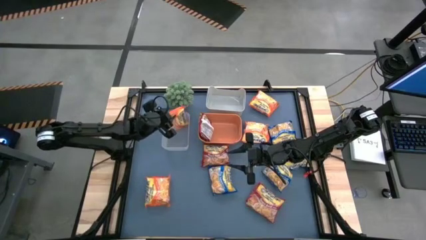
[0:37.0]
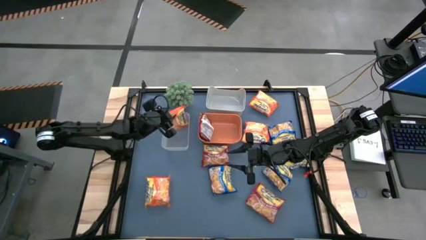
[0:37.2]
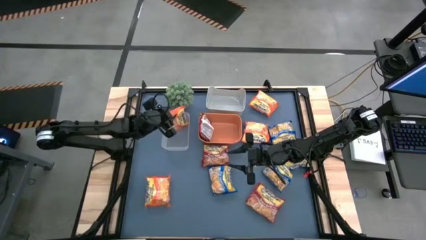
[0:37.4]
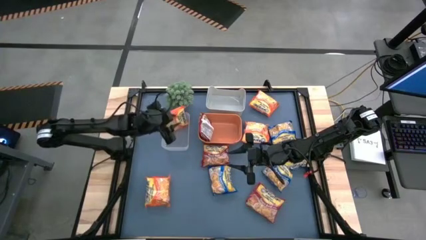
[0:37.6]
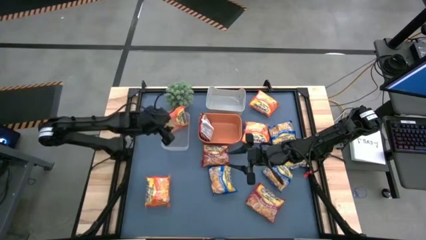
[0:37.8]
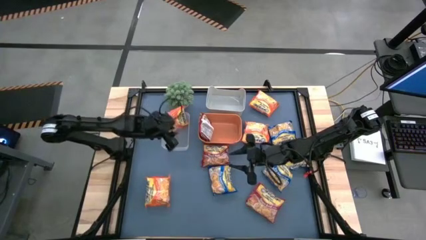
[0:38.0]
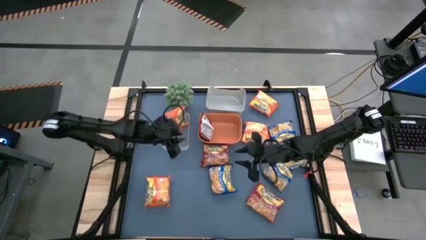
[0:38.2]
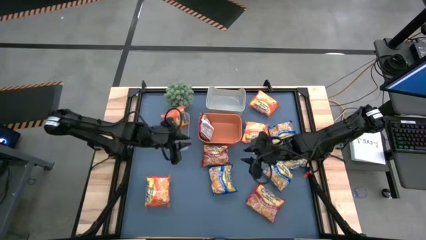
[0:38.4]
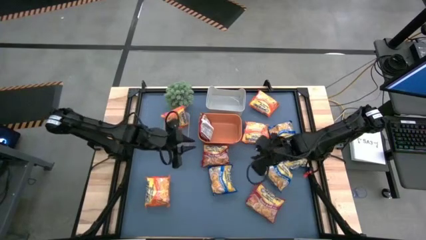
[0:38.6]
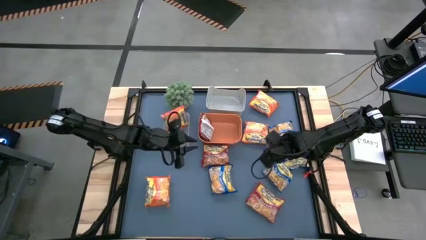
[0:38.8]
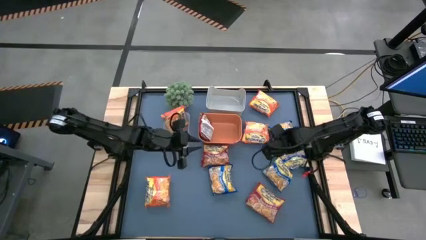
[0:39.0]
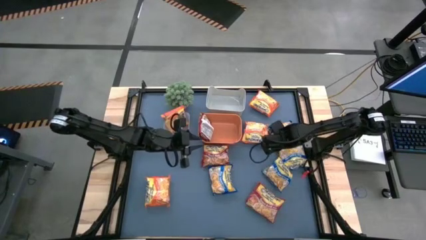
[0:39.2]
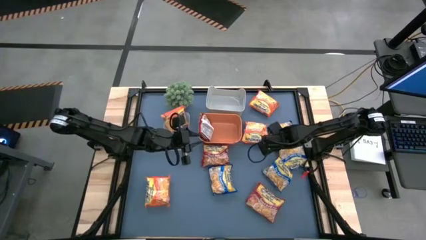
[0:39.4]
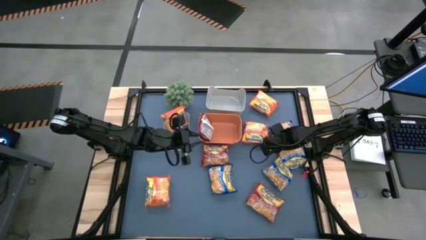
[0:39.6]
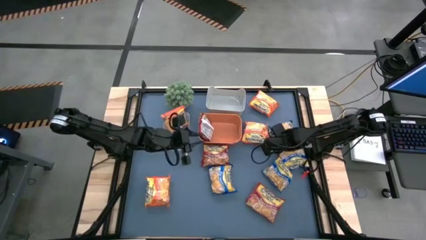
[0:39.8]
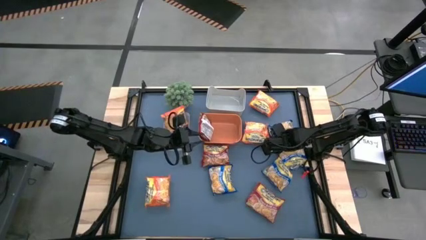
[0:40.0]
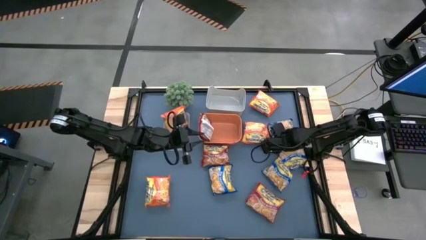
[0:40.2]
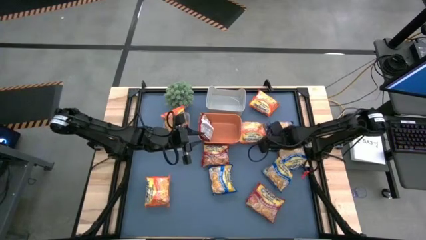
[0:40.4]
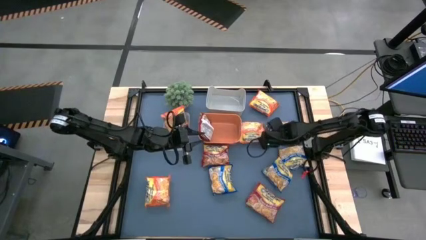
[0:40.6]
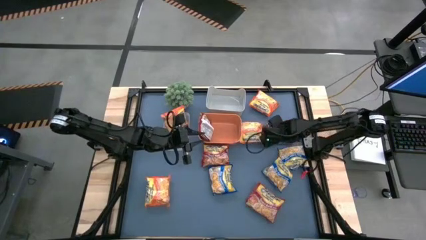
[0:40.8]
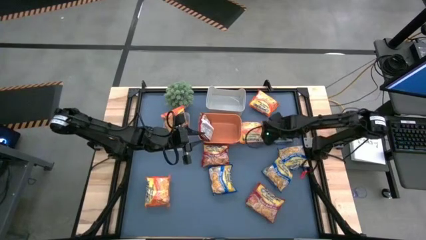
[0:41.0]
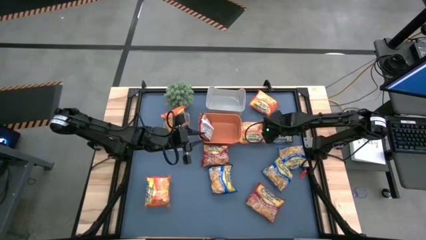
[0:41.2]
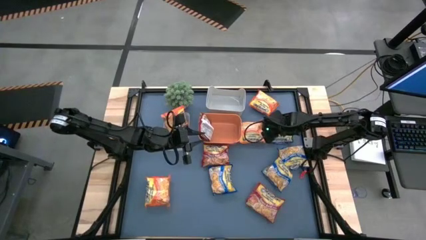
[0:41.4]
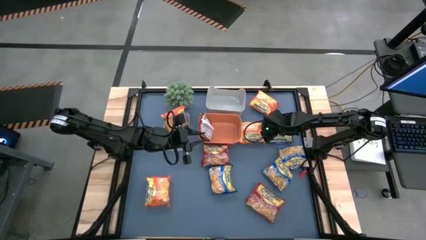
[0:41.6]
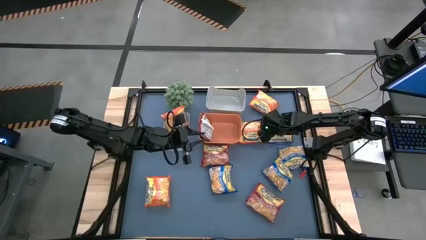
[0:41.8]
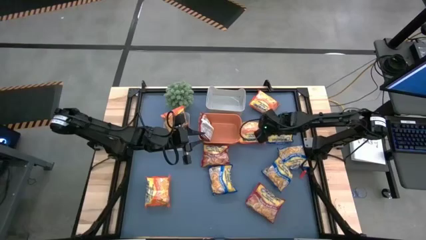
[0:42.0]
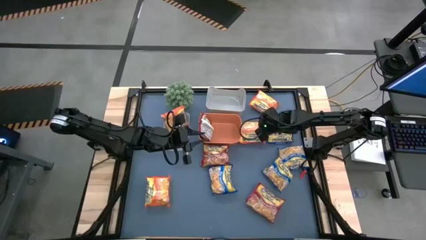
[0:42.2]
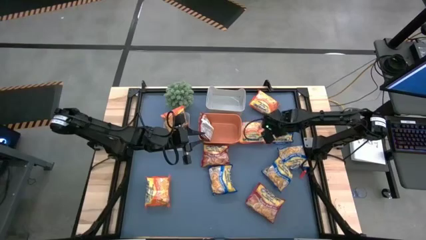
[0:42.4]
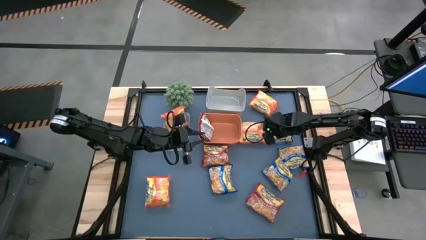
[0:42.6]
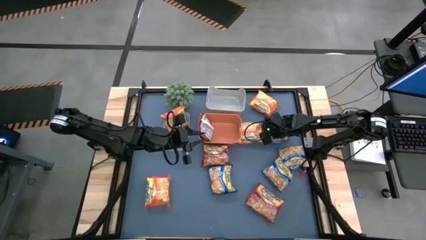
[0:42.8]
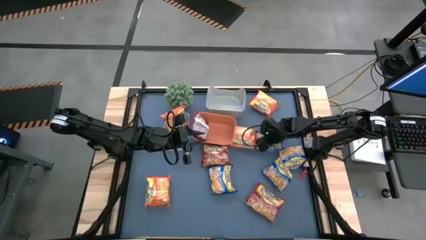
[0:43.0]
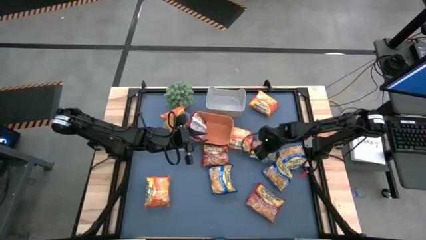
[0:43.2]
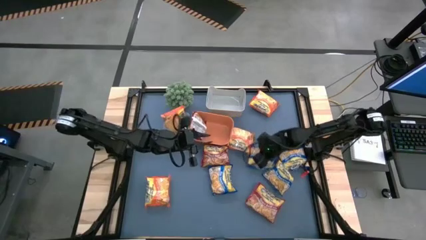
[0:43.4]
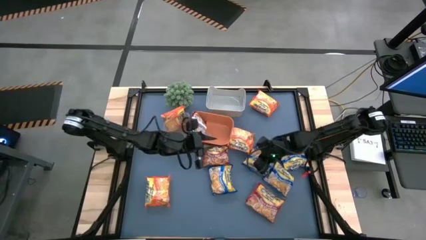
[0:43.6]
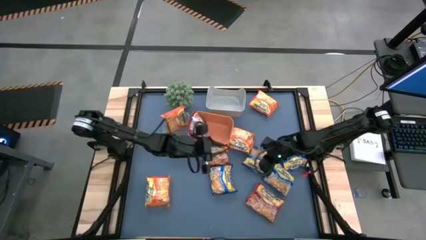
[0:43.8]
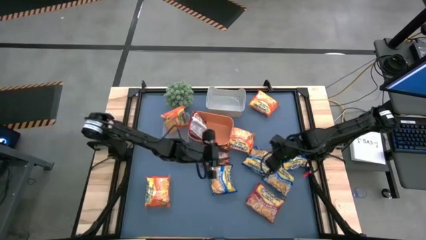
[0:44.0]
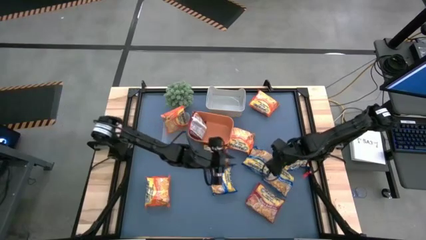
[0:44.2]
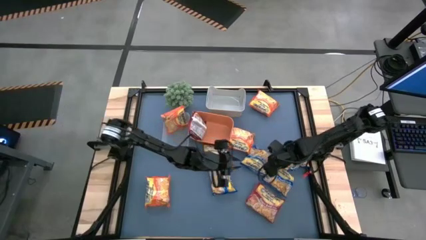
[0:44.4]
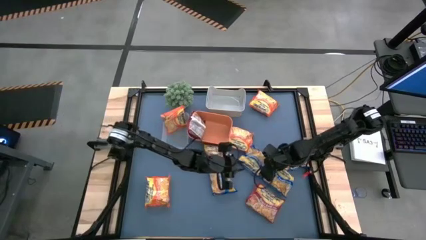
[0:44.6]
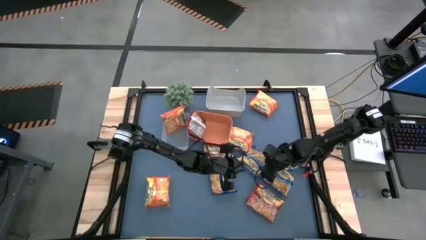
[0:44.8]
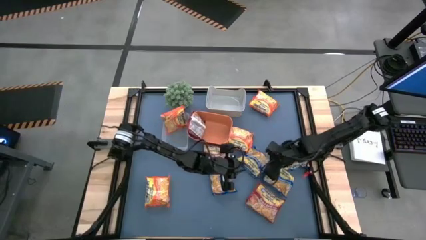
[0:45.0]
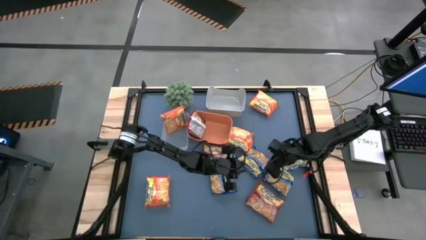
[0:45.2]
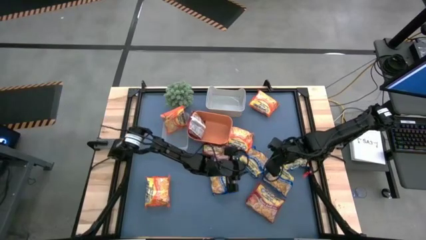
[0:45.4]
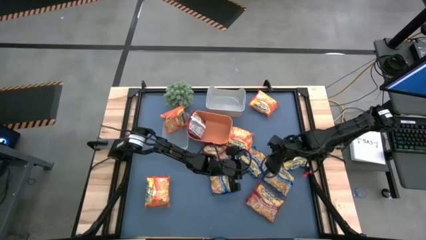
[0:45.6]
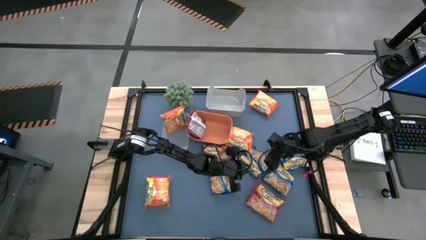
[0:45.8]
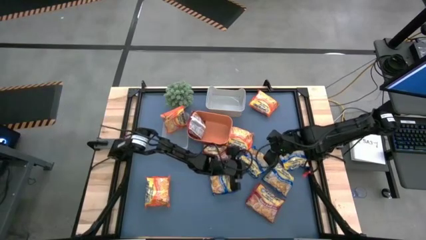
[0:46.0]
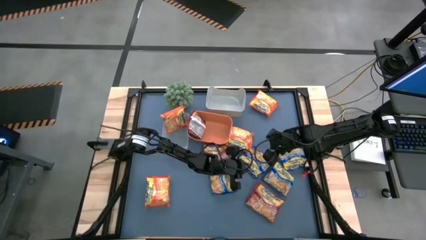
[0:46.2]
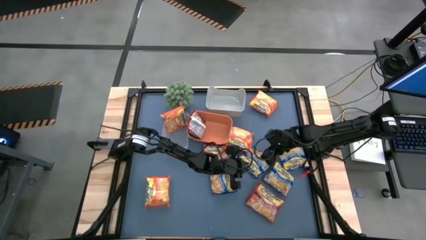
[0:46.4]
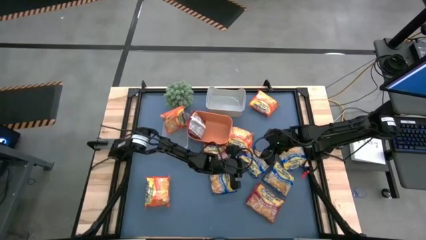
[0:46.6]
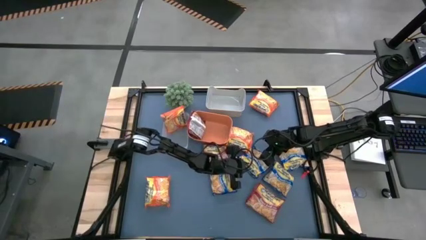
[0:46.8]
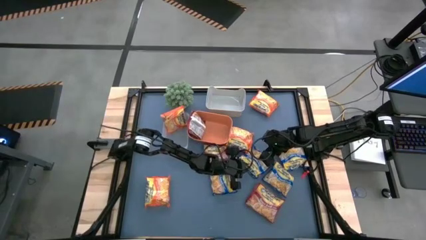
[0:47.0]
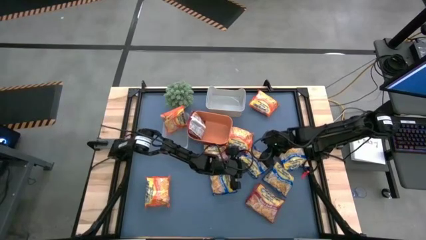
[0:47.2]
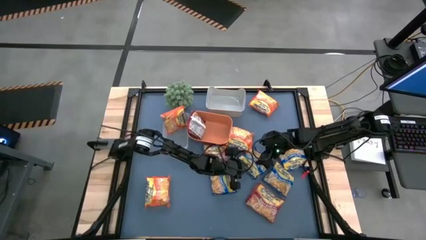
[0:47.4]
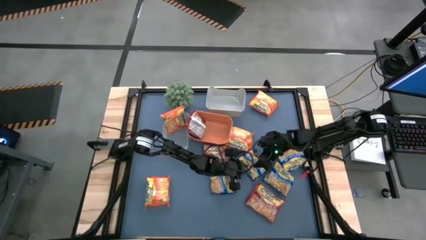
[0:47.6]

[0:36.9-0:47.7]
Task: Sort Maruchan noodles
Put the blue noodle pack into the gray bin

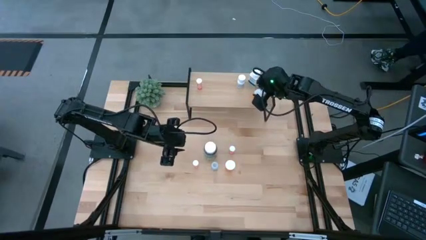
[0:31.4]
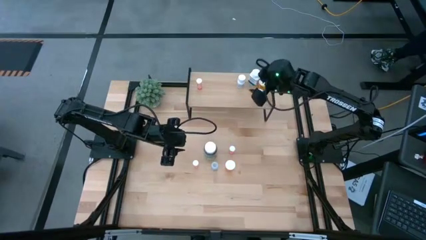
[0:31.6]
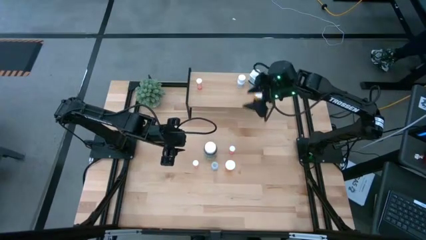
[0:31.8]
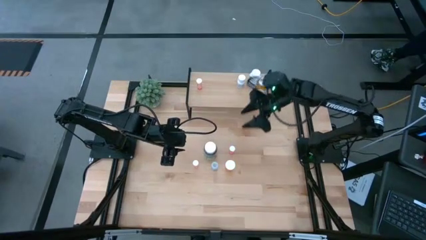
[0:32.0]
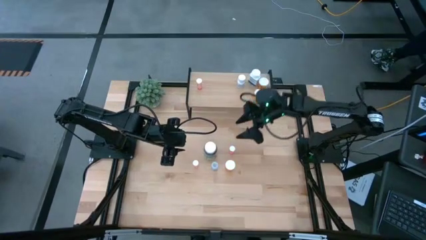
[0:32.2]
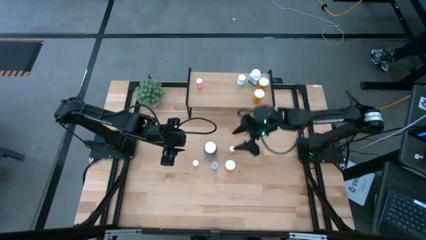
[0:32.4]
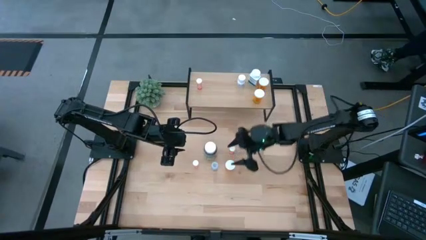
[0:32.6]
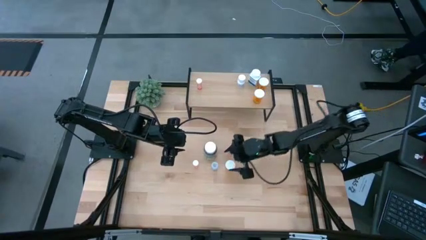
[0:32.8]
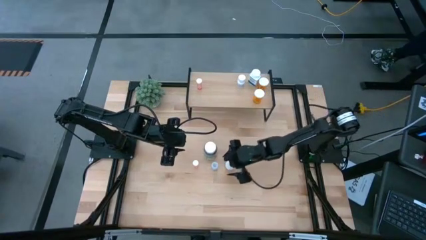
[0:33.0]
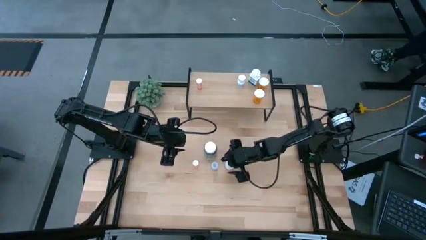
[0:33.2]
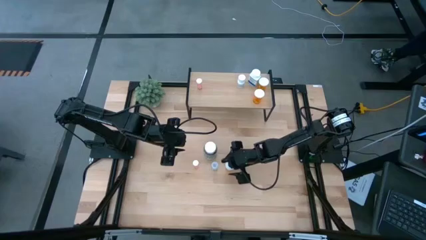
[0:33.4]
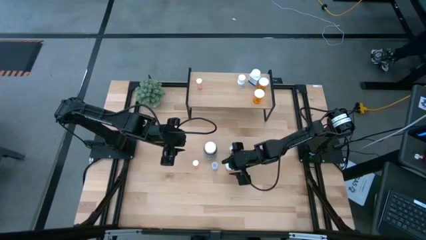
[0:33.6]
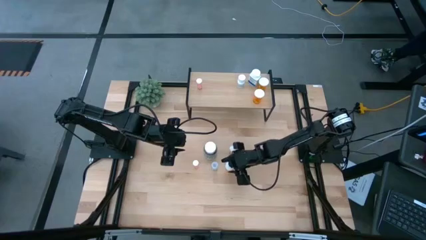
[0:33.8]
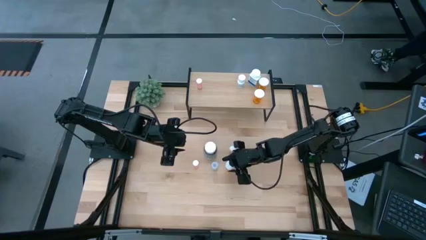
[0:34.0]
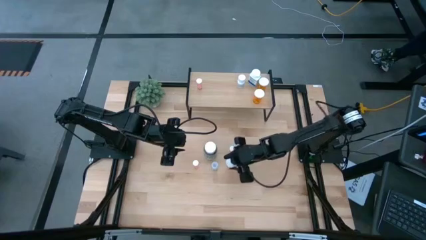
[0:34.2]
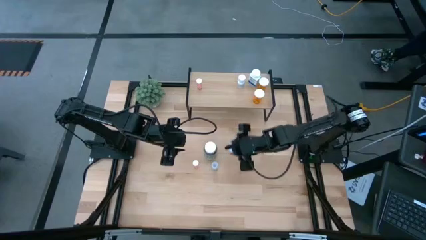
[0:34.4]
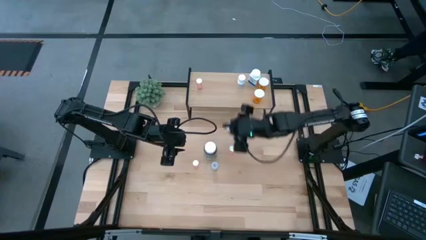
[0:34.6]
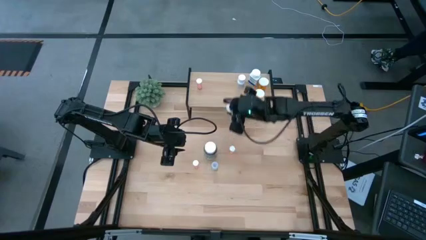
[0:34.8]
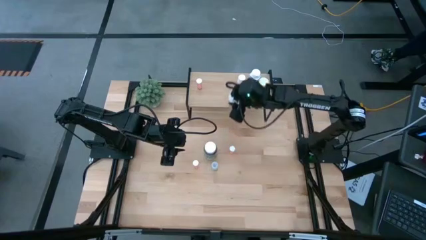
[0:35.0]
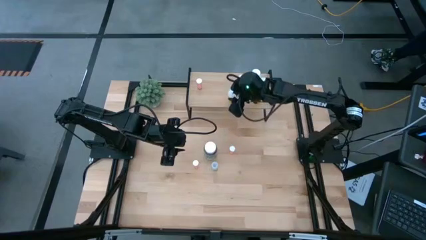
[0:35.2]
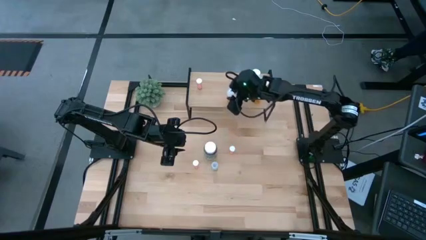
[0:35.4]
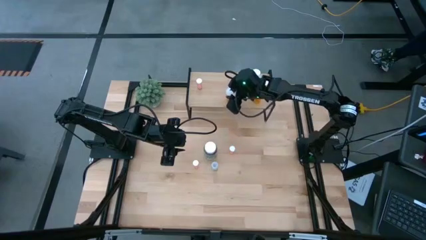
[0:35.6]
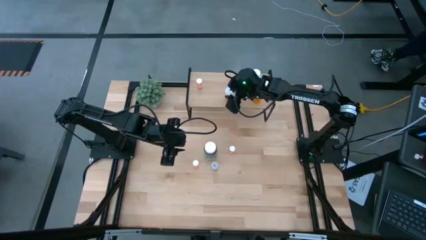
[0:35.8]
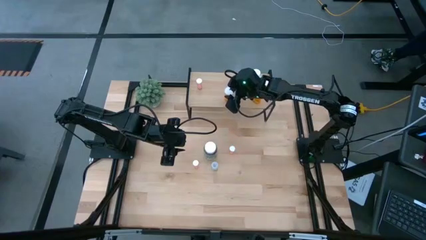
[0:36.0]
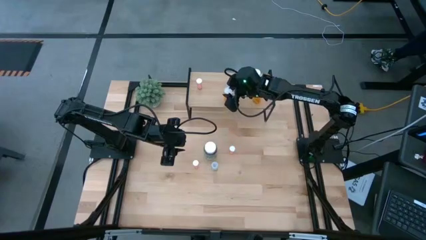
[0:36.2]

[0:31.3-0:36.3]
Task: Pick and place medicine bottles onto shelf by color
Put the orange pill bottle on the shelf

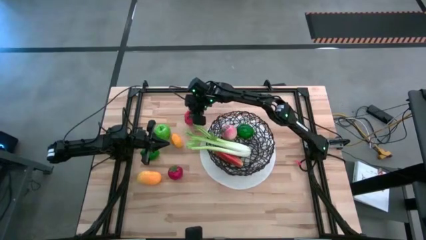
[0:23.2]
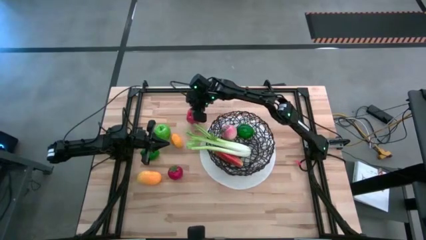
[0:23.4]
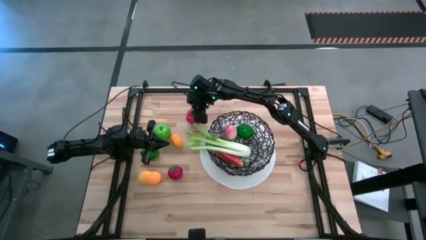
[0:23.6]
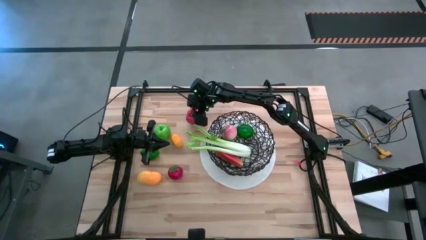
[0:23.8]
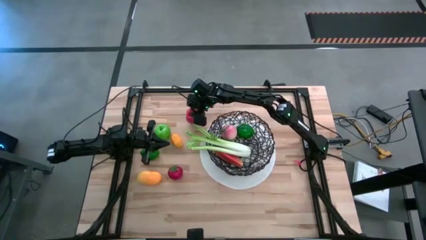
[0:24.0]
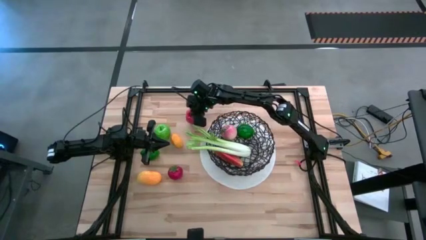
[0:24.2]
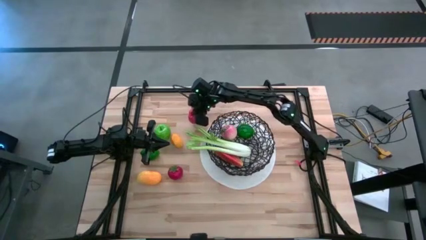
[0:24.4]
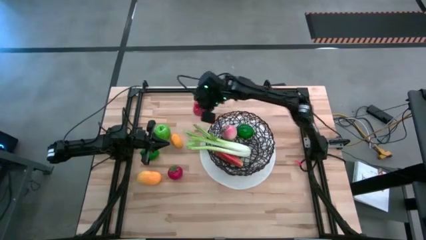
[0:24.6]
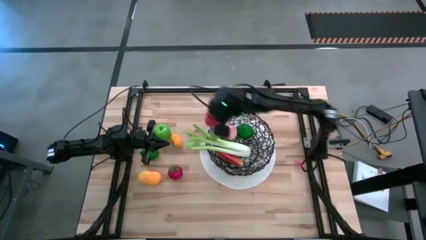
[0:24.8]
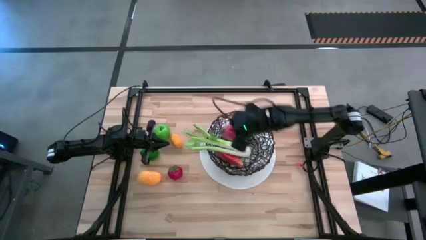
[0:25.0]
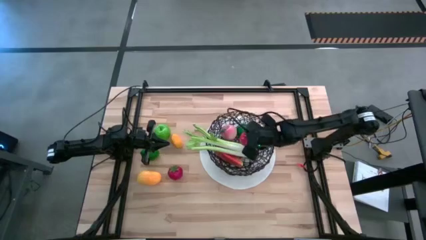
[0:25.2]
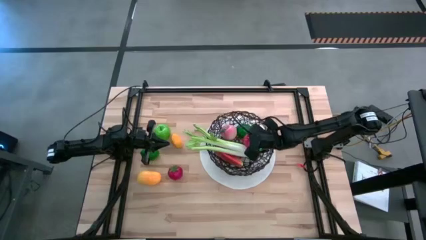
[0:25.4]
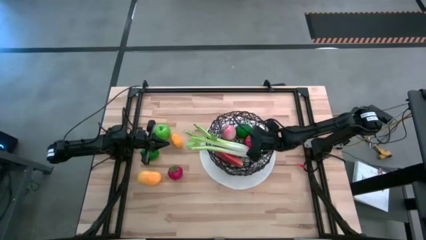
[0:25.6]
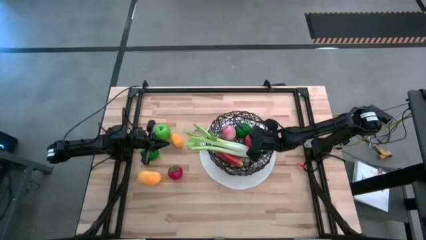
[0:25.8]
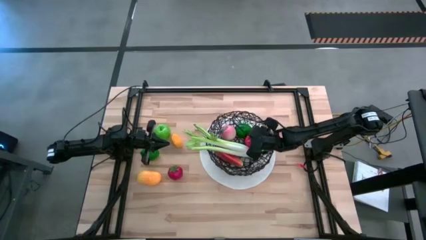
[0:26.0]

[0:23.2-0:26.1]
Task: Build produce basket
Put the red bell pepper into the wire basket
